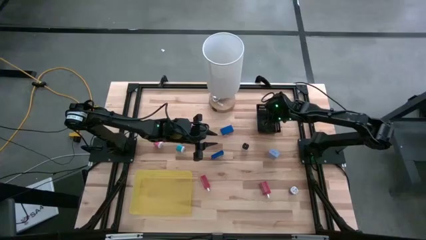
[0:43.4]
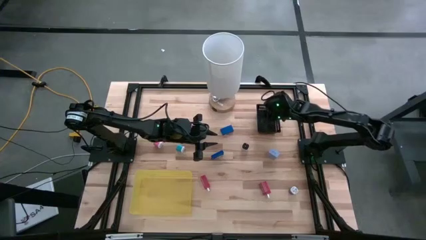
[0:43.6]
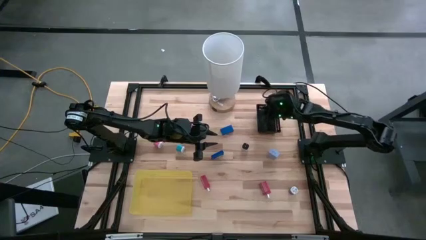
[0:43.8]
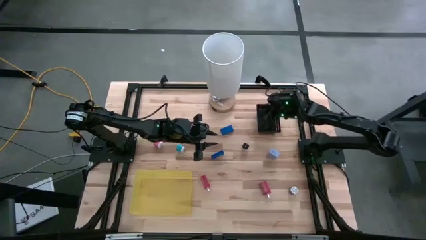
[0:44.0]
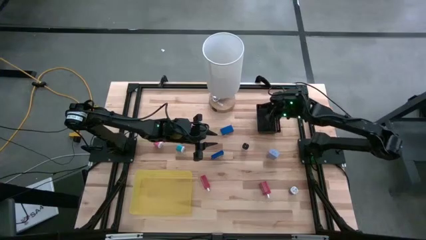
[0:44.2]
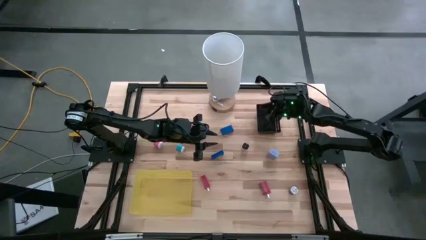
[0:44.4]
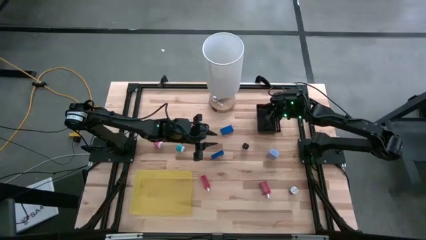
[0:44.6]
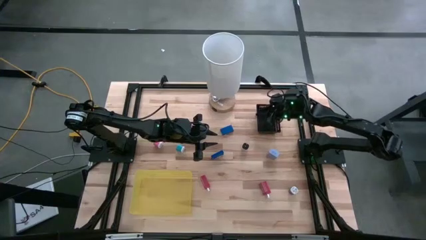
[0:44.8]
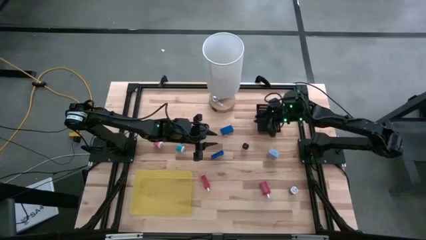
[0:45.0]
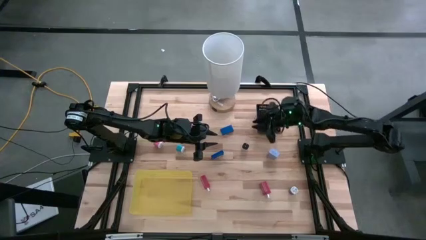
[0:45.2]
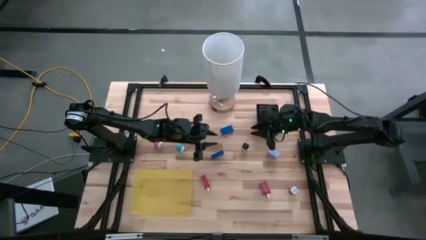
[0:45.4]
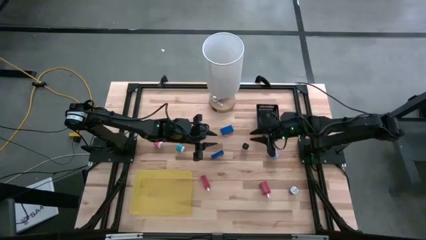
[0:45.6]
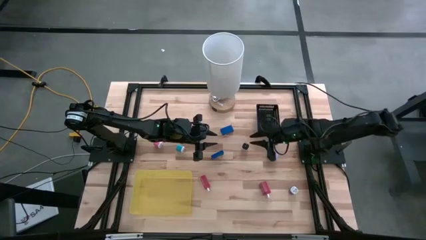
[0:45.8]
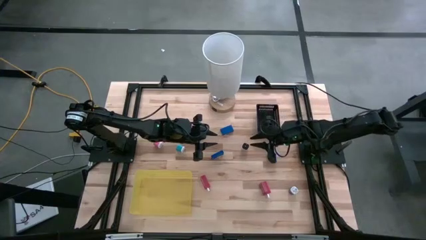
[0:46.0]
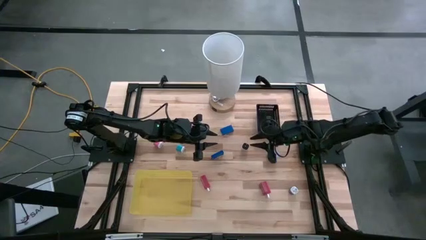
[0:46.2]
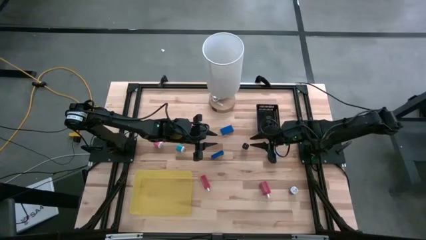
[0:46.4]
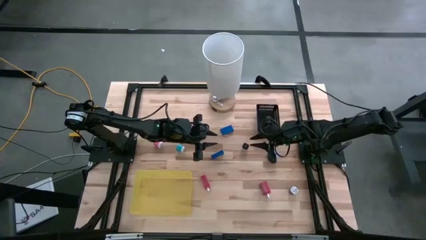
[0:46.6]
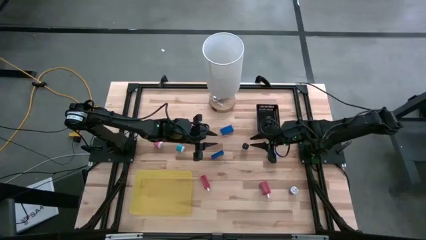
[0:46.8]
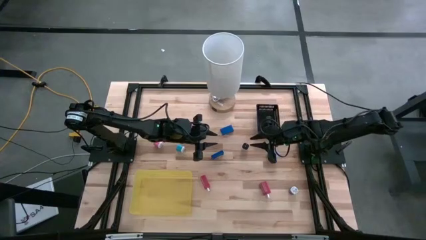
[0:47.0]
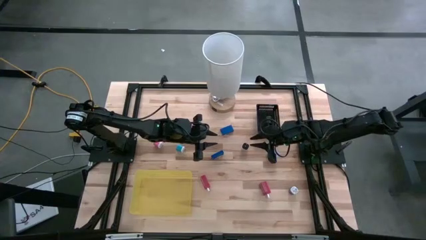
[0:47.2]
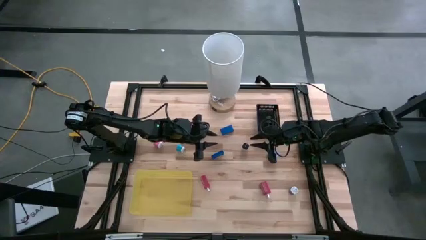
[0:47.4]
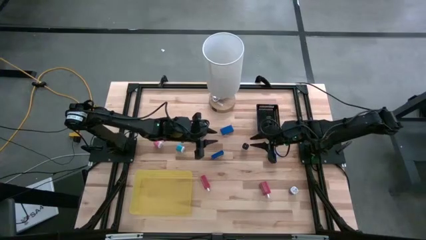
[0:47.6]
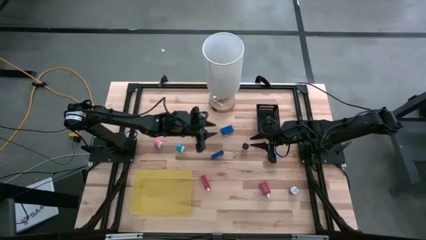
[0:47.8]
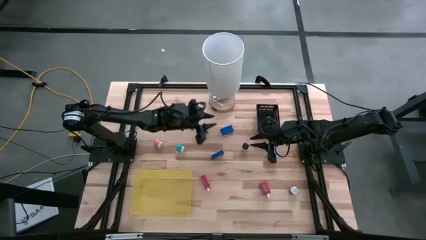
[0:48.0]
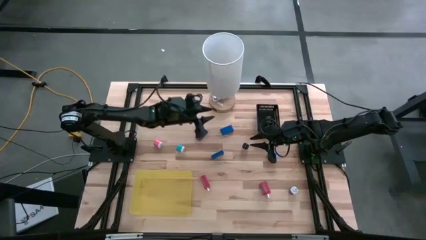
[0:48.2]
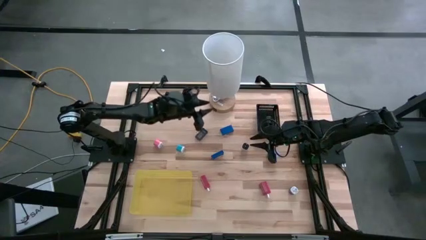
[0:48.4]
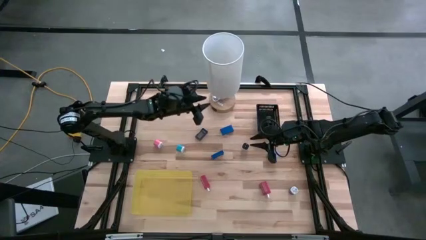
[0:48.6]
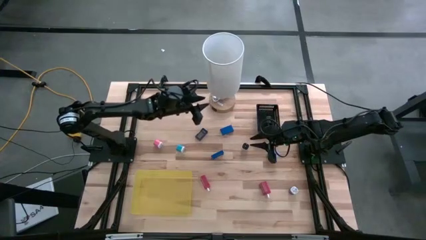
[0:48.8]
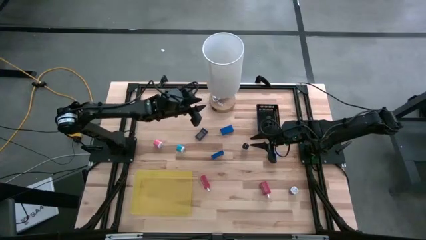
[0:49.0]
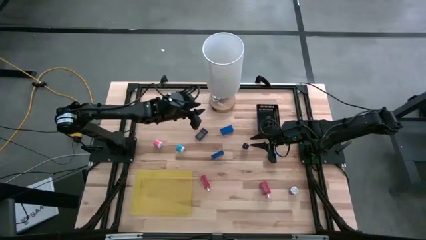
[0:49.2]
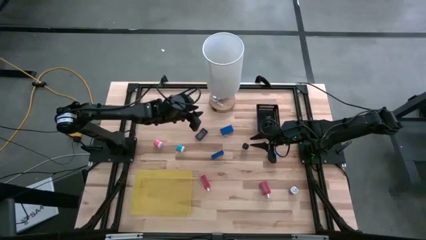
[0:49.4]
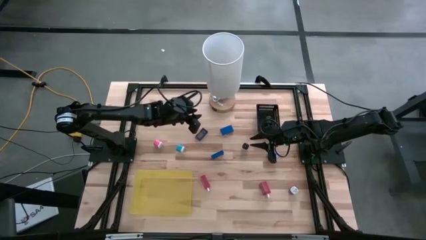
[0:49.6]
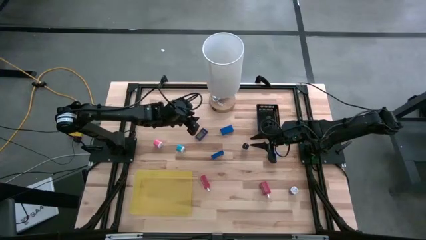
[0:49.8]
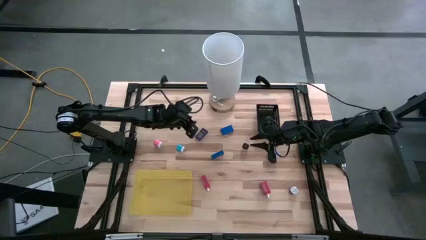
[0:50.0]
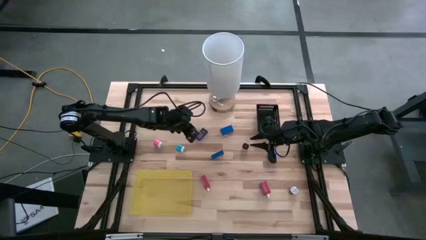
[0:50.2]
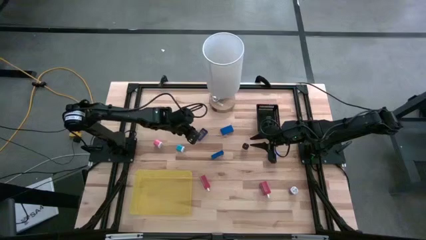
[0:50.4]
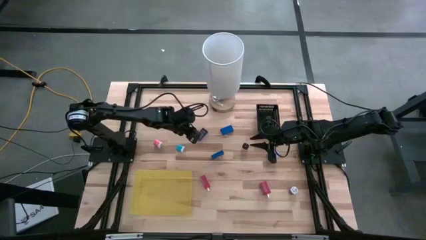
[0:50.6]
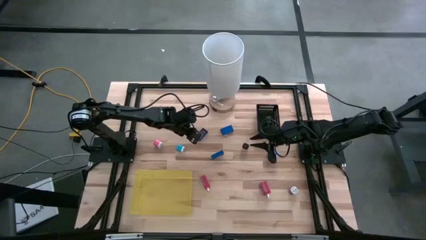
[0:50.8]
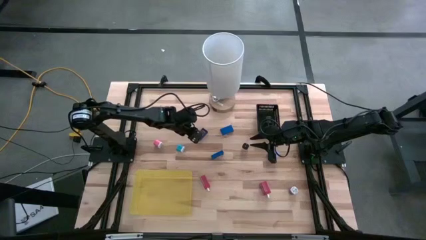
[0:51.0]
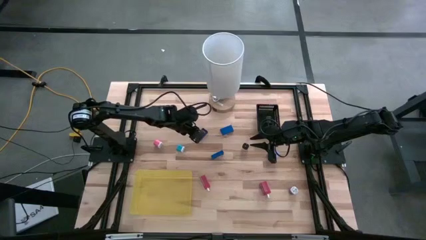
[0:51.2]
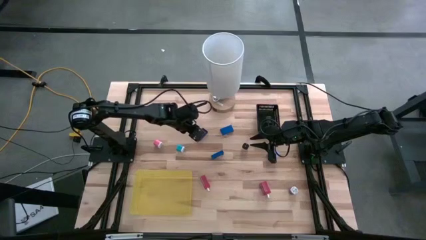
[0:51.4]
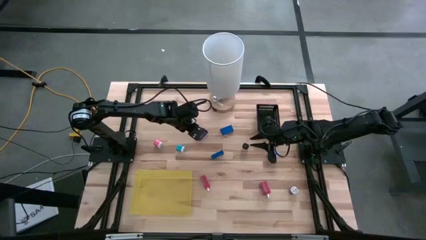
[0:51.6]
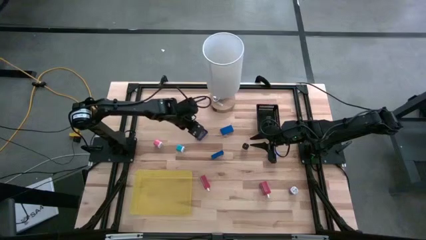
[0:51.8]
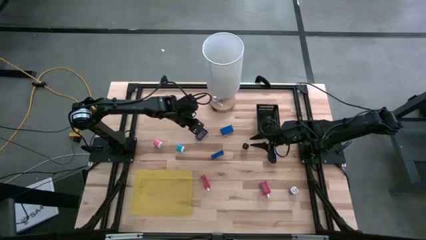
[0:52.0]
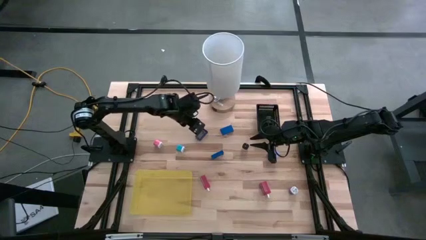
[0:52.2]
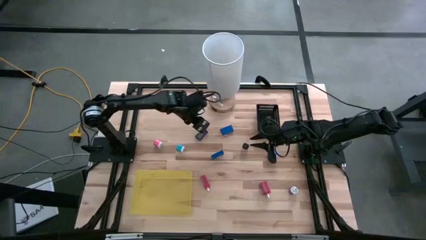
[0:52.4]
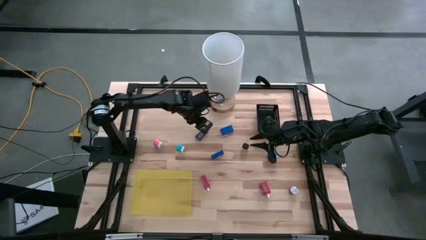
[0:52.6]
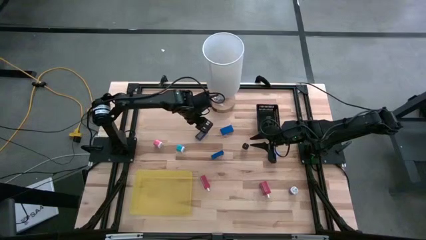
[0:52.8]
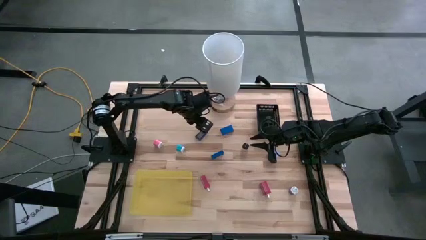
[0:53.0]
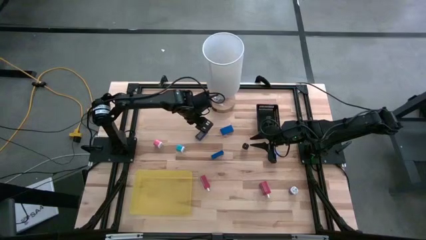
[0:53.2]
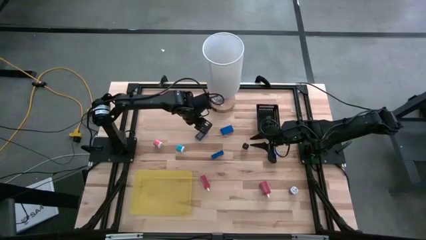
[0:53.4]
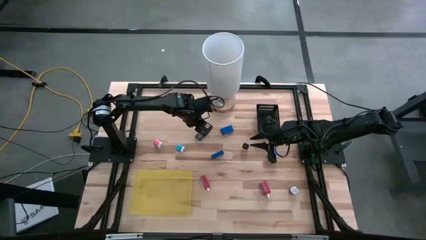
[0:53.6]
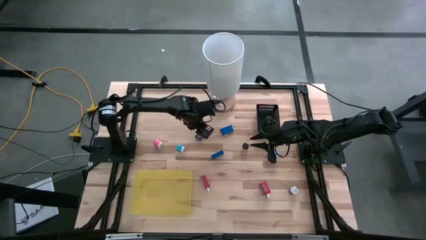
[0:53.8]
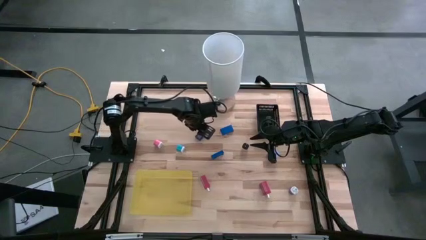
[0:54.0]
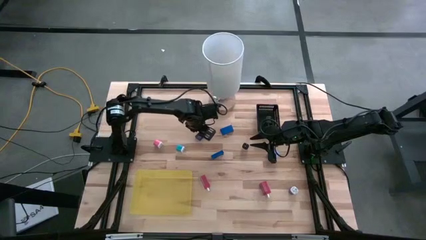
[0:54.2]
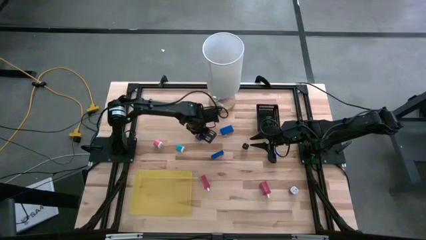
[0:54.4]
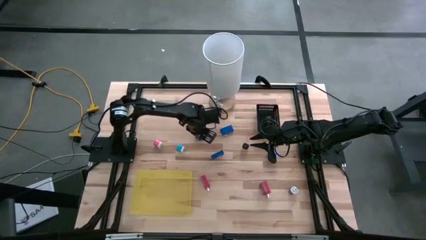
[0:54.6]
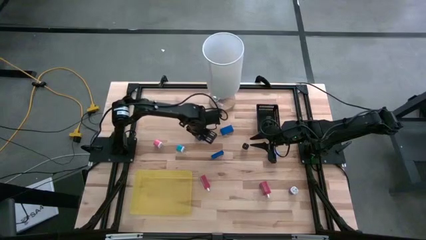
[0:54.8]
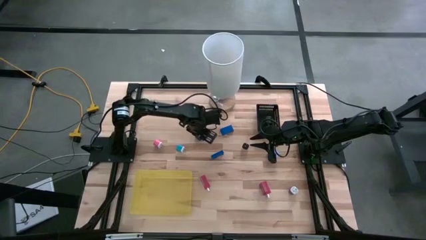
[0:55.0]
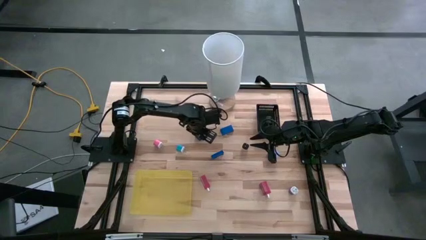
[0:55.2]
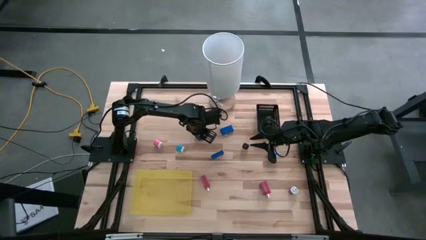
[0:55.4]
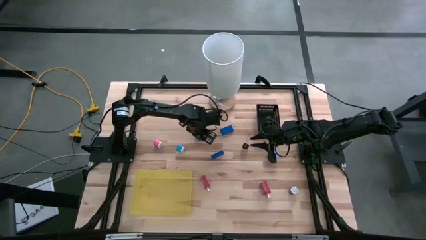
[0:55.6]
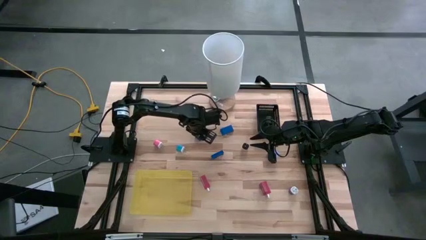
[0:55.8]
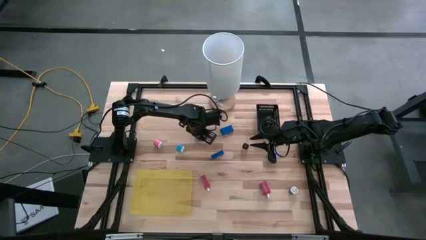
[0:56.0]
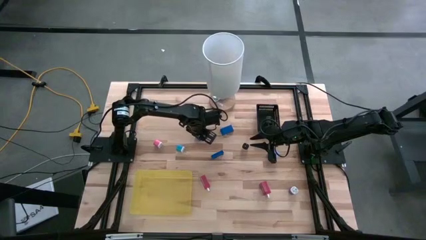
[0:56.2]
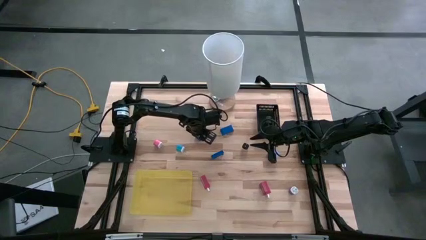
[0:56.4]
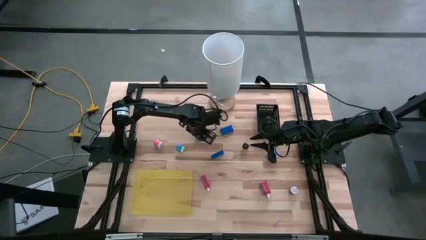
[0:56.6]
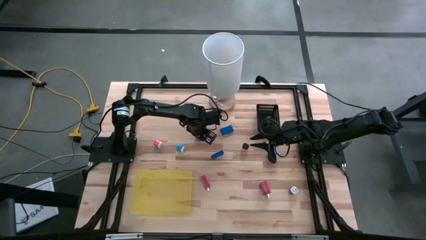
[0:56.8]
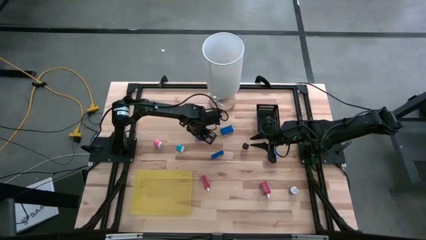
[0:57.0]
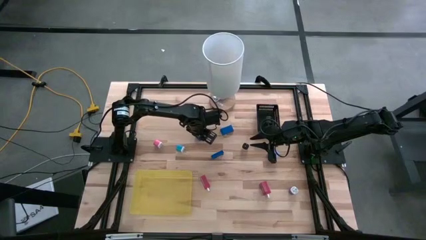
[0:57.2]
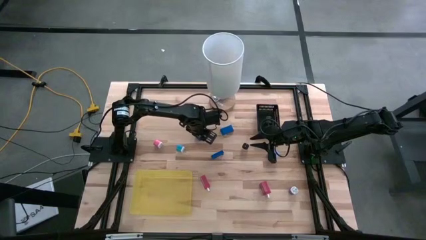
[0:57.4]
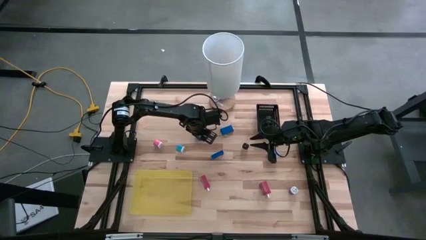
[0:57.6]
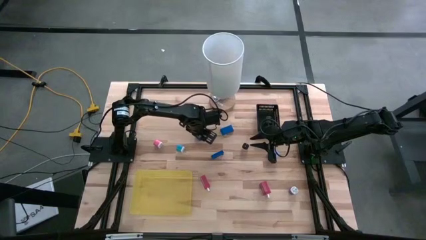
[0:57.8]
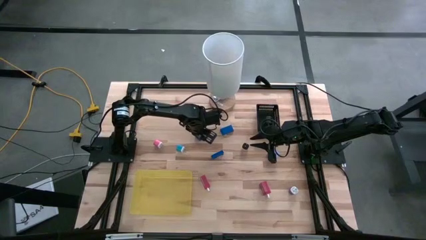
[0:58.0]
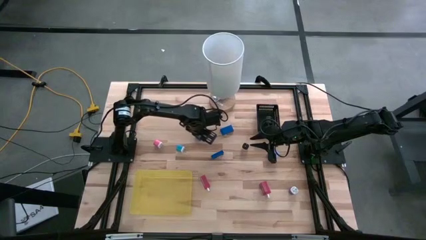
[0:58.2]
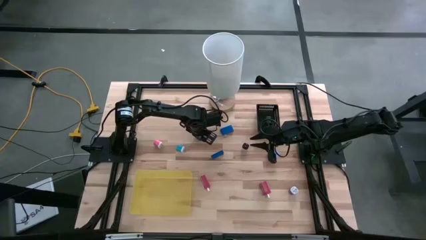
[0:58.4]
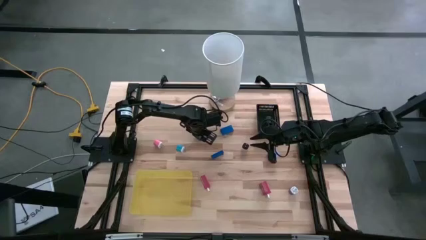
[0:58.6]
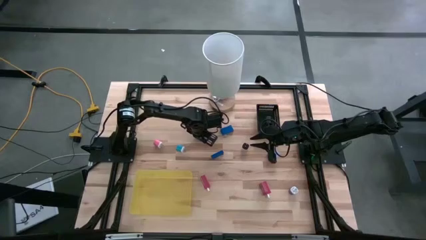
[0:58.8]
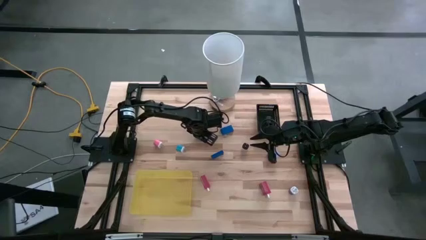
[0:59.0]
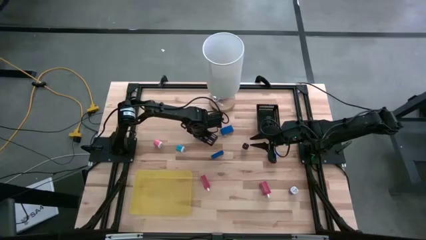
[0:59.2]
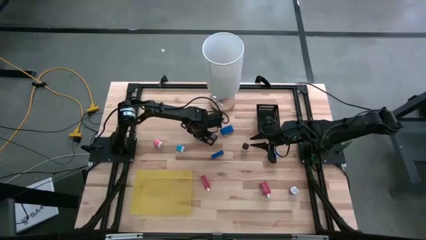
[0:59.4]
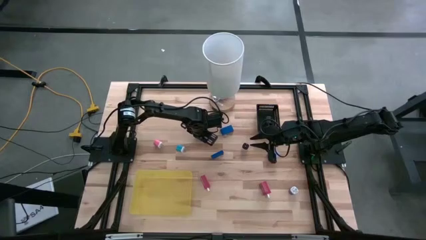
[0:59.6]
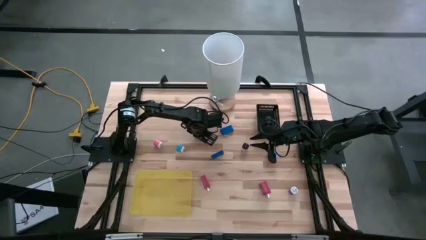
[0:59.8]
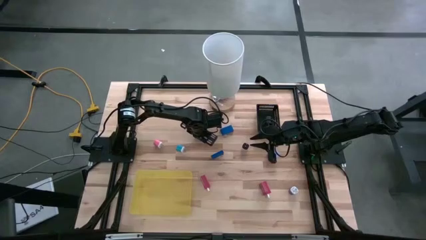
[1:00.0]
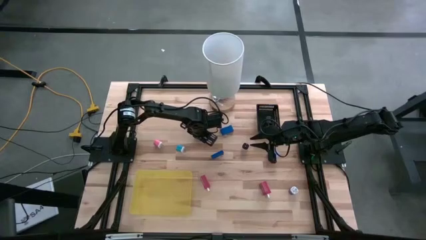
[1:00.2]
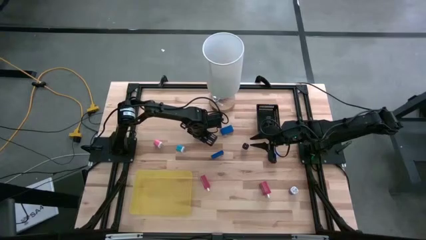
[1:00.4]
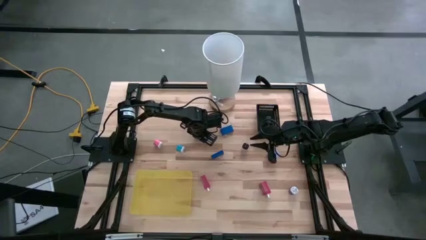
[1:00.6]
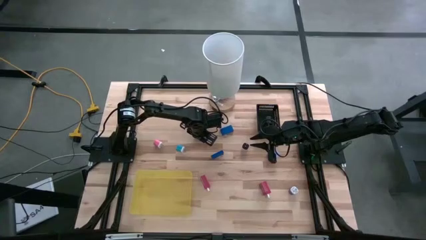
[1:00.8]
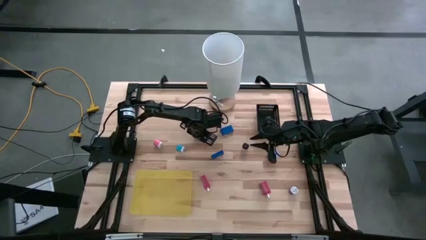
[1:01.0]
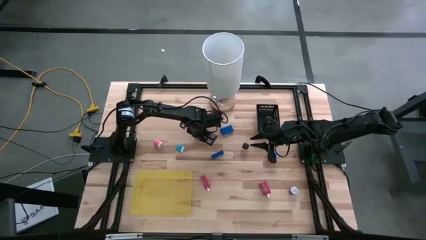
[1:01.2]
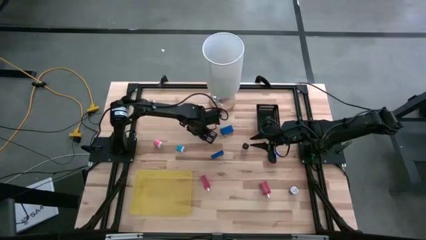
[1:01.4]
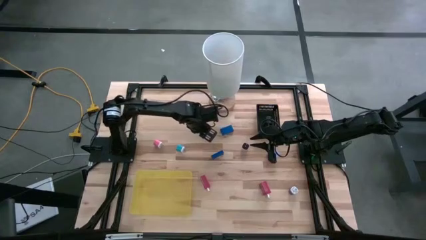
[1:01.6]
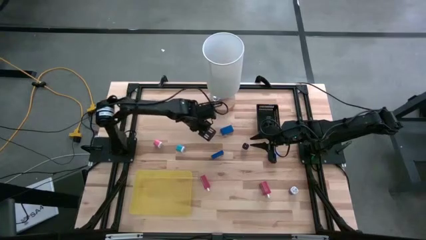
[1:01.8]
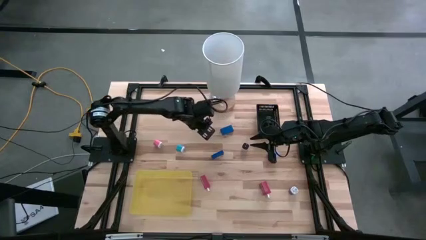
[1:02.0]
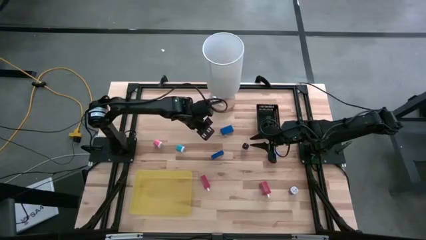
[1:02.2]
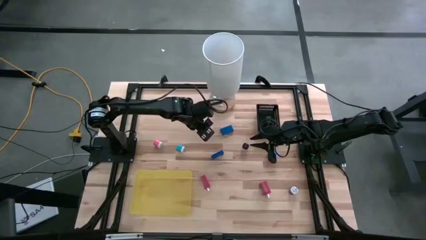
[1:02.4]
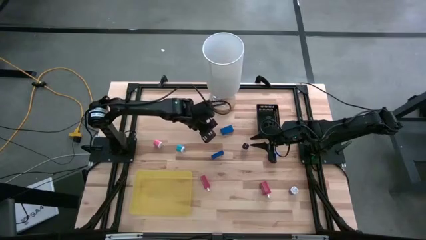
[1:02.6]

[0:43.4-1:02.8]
Task: Pick & Place Office items
Put the violet digital clock into the black bin
